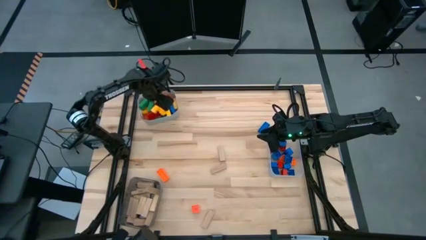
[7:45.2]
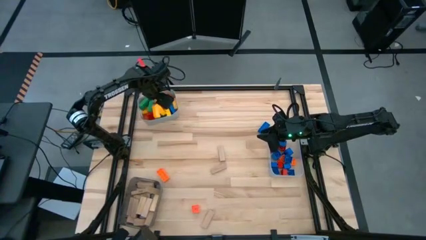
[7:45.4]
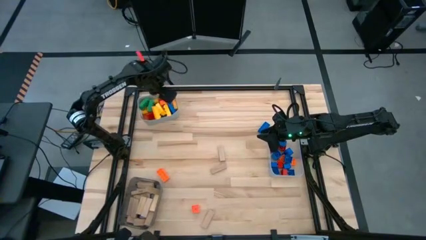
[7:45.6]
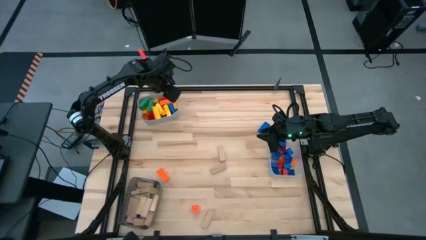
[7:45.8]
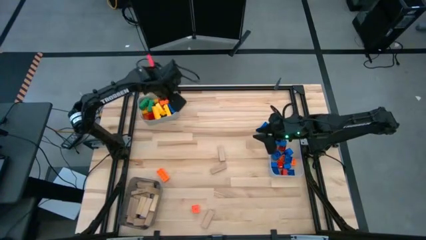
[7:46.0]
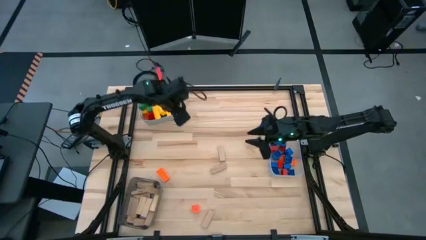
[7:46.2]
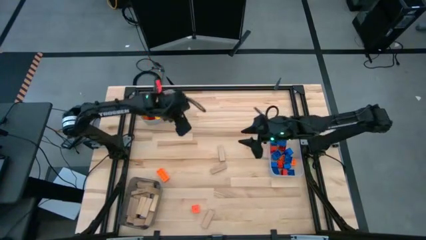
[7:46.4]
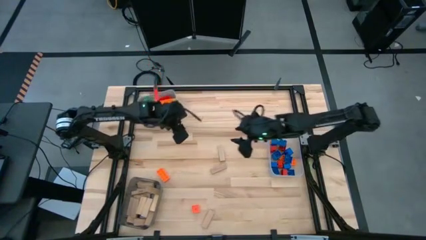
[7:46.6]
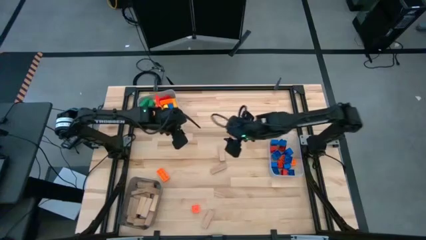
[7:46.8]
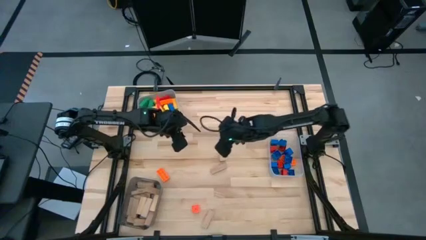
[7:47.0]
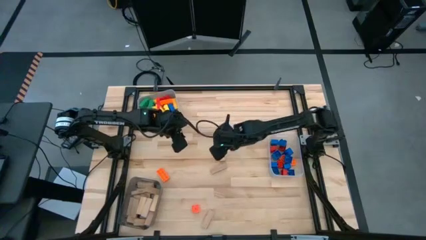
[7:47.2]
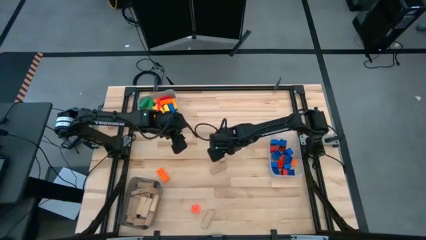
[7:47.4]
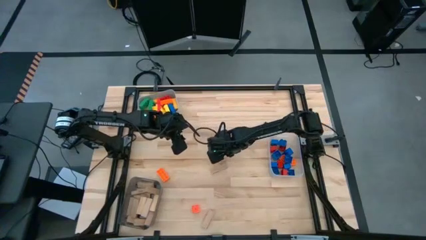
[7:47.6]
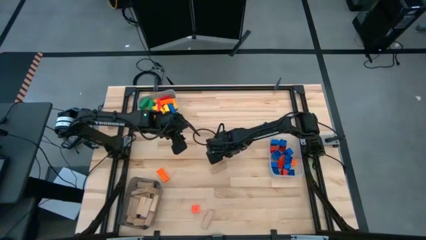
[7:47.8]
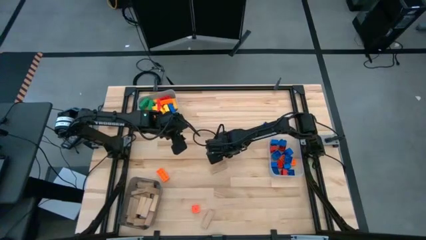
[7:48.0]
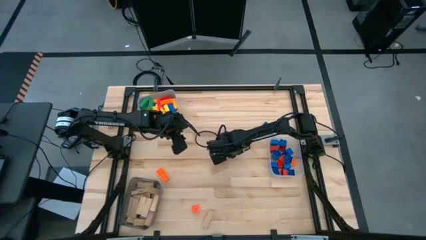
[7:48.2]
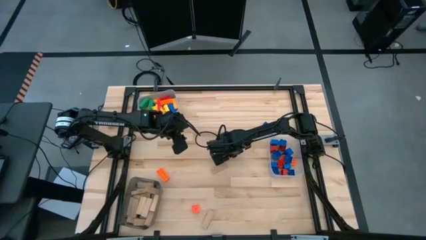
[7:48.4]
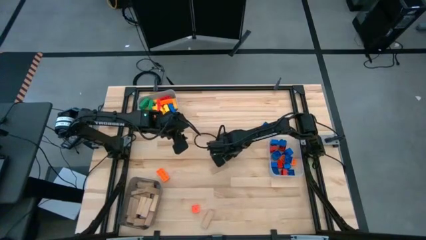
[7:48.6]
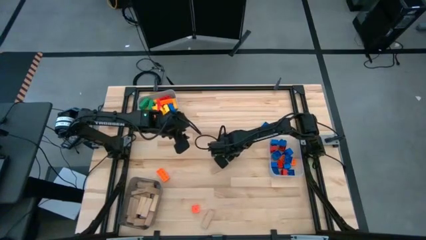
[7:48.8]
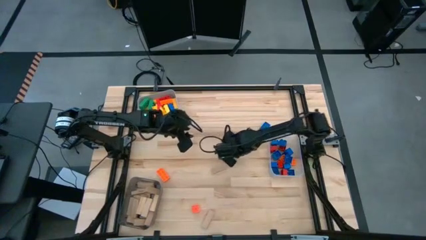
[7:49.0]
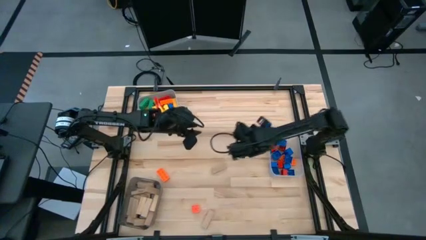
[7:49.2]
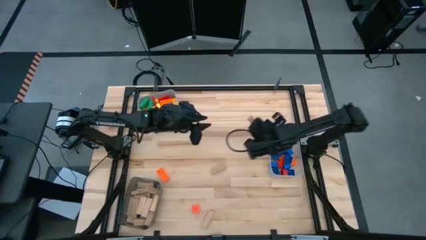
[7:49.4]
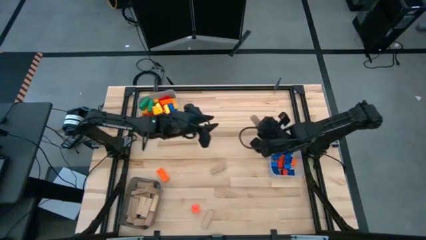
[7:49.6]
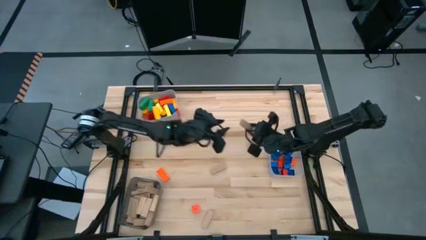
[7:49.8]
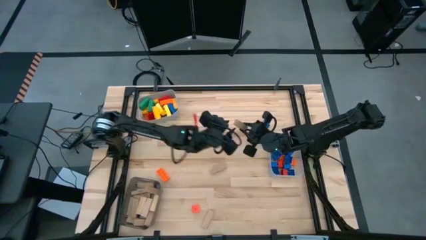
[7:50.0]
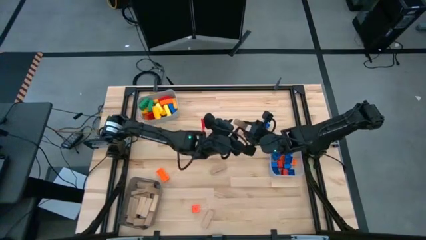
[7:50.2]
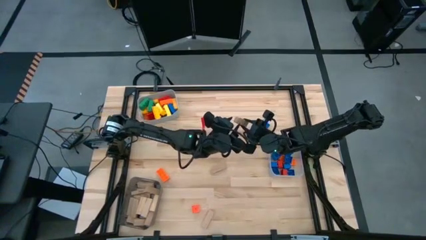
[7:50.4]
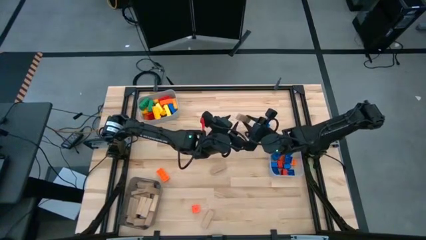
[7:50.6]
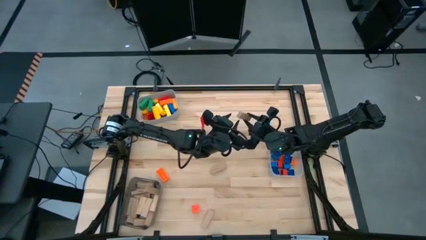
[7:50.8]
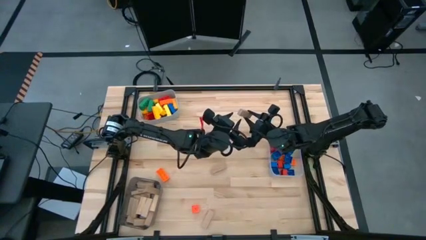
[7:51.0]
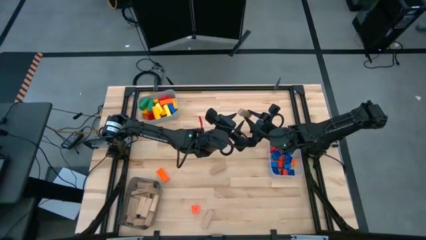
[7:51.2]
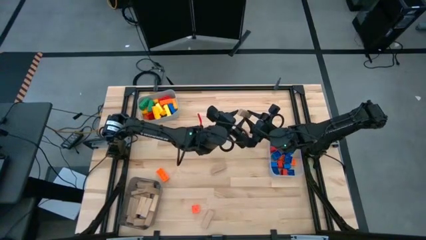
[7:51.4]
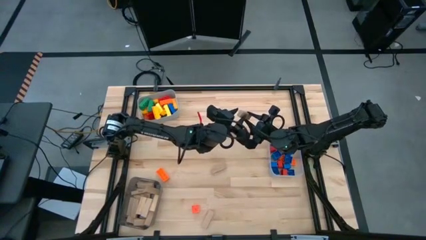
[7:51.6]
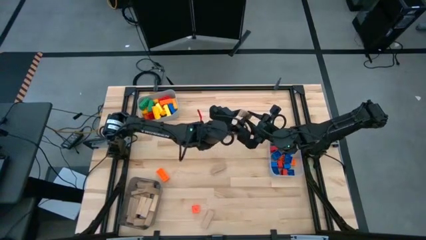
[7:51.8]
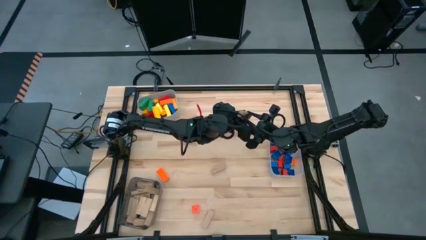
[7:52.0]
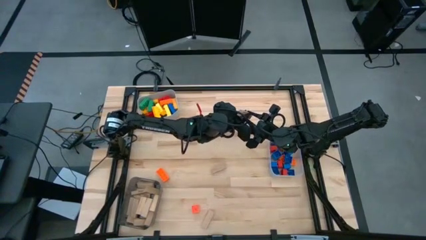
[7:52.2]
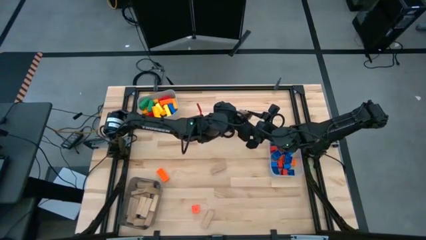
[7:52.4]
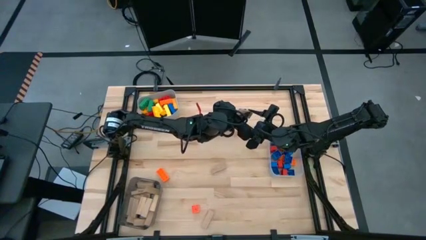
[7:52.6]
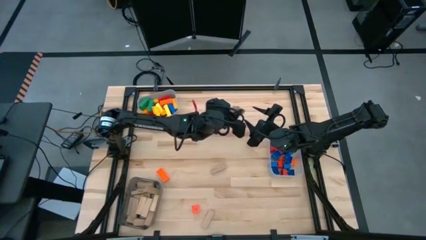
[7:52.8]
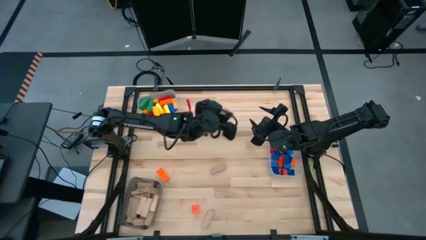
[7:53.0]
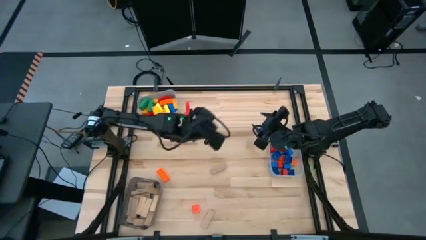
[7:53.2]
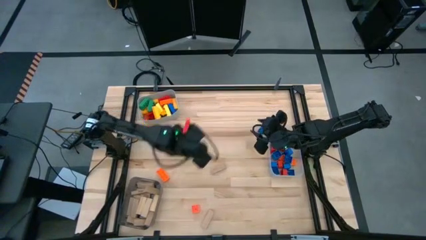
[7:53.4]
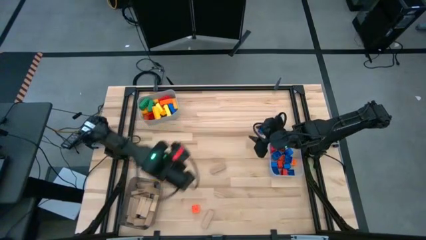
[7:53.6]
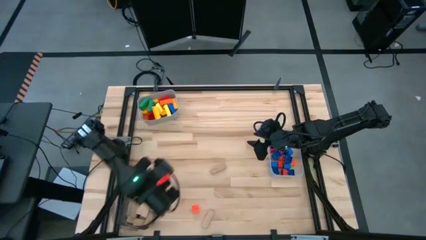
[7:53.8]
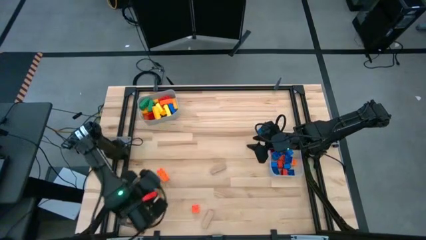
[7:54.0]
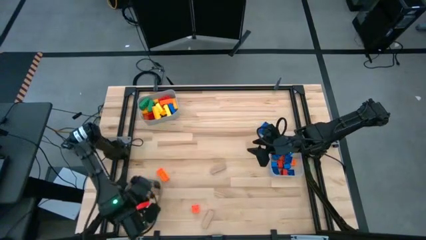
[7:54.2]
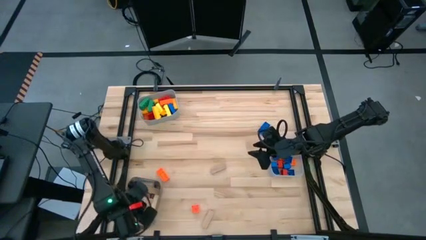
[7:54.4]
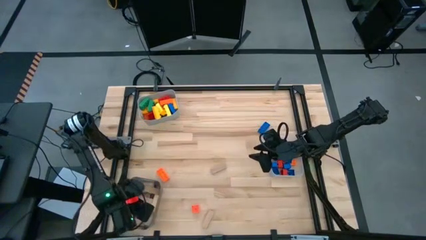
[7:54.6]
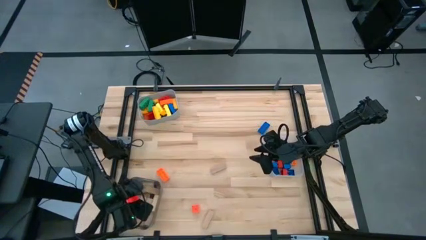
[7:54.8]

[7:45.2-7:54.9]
Task: Sort blocks by size
Put the brown block into the black bin

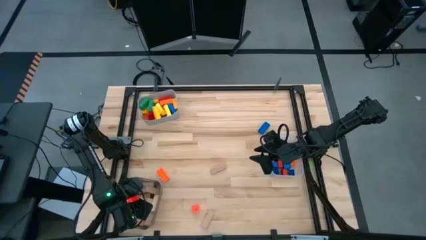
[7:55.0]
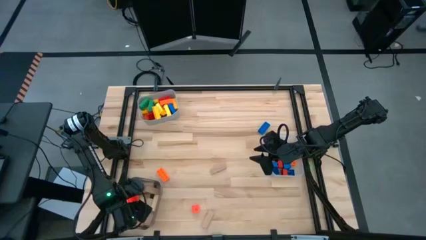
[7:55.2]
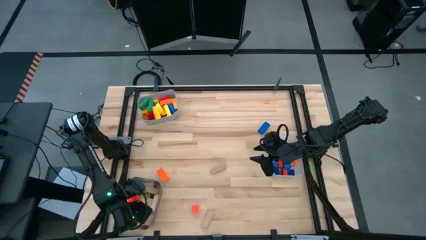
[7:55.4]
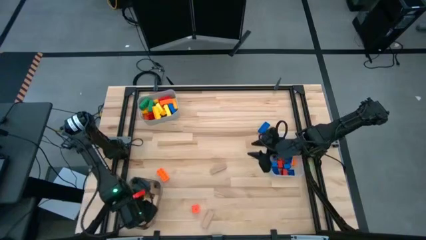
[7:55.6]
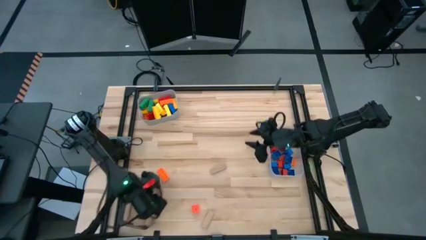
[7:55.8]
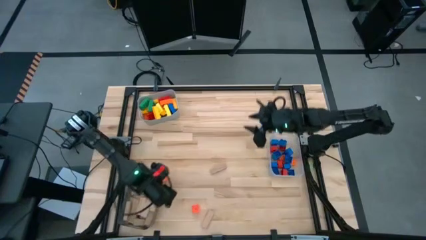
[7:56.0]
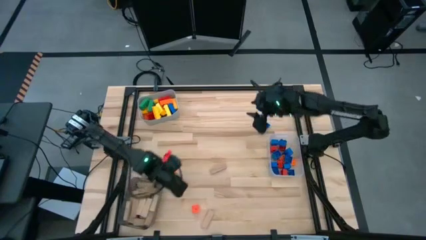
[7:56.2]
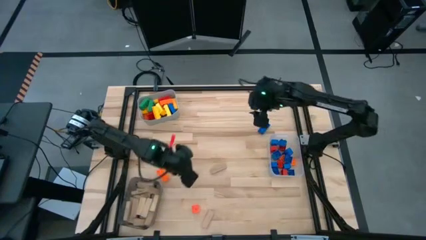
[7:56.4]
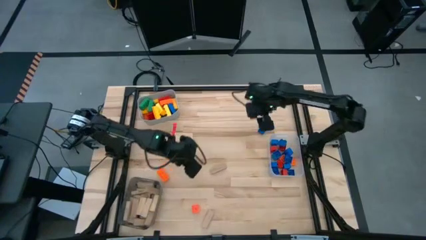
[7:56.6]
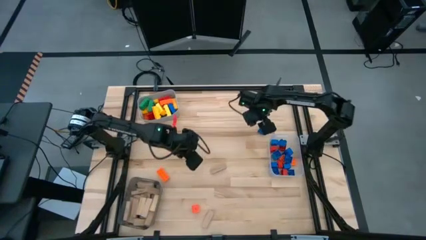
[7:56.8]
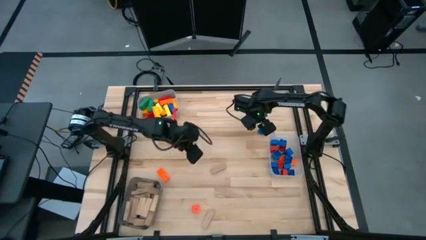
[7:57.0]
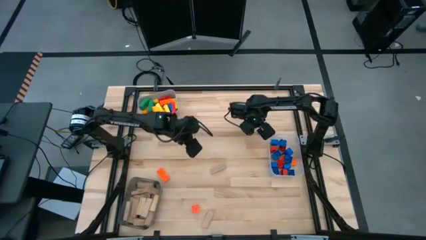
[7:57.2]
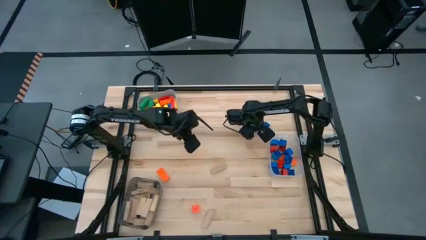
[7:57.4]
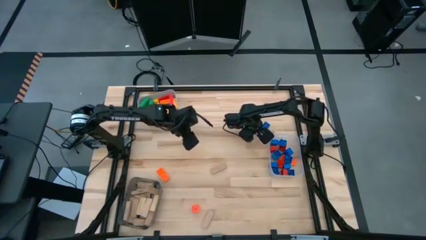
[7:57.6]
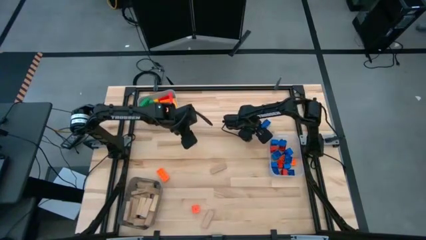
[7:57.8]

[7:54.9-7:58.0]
Put the large blue game piece into the gray bin

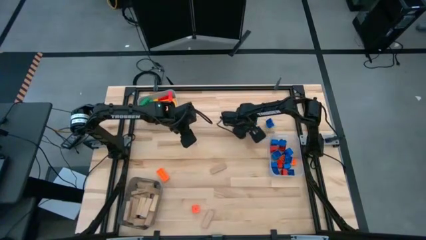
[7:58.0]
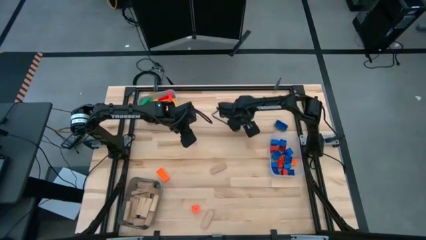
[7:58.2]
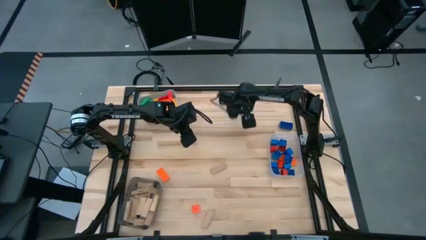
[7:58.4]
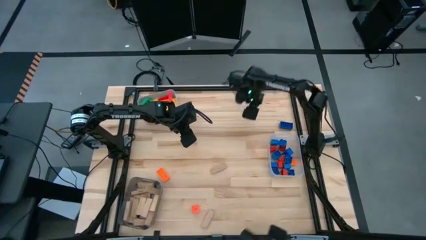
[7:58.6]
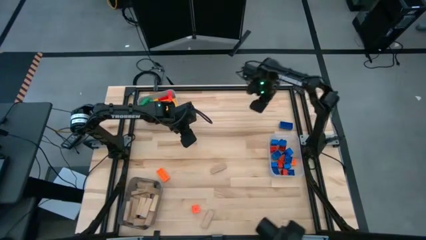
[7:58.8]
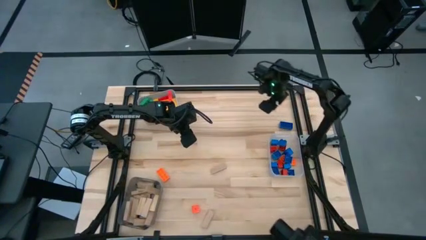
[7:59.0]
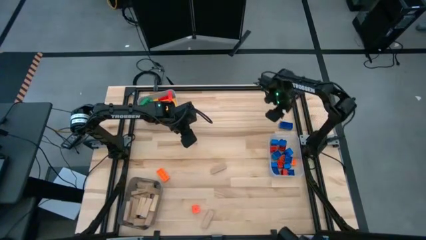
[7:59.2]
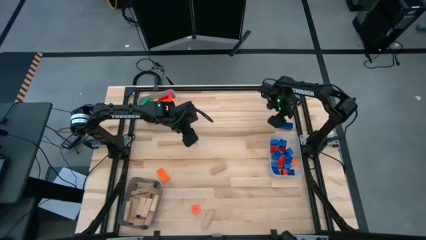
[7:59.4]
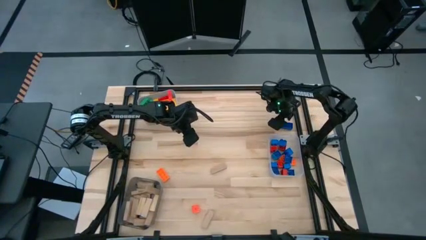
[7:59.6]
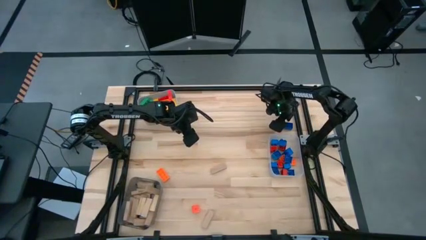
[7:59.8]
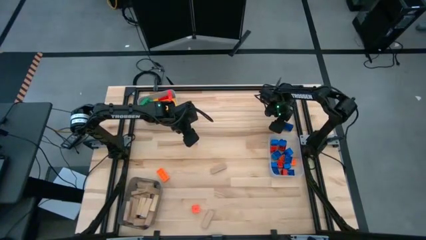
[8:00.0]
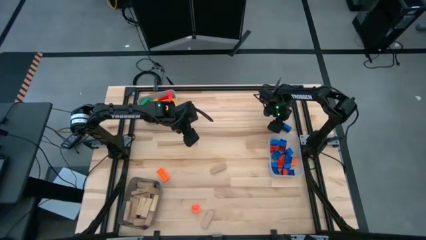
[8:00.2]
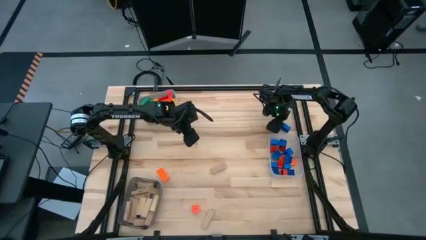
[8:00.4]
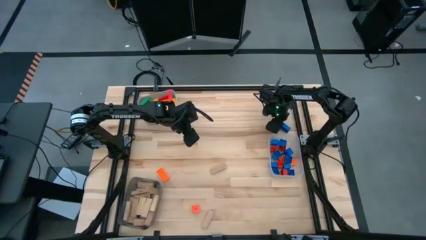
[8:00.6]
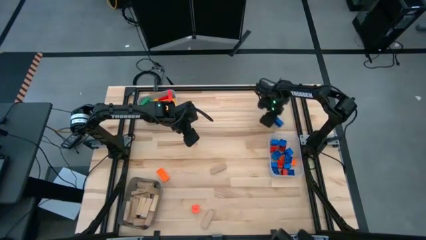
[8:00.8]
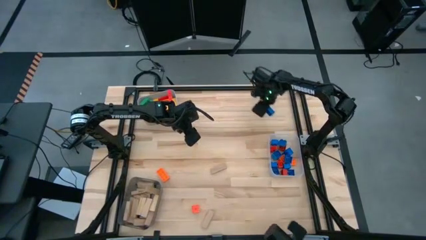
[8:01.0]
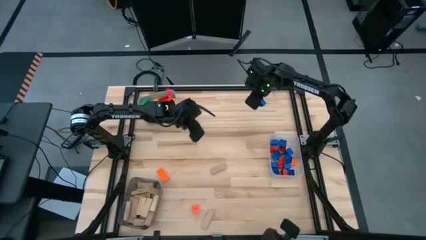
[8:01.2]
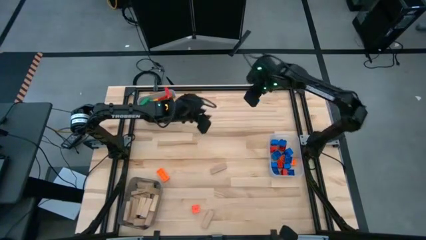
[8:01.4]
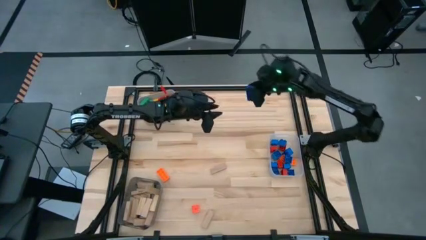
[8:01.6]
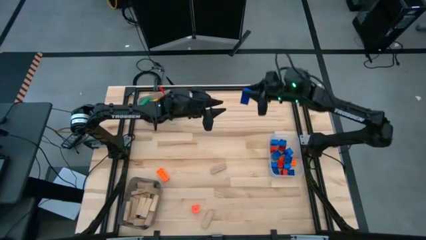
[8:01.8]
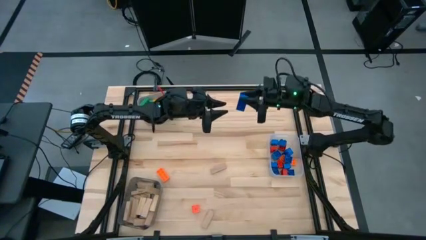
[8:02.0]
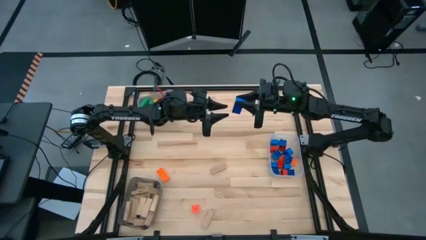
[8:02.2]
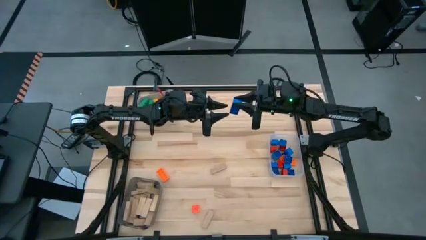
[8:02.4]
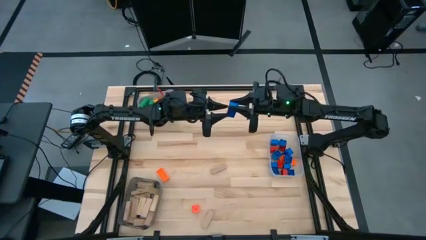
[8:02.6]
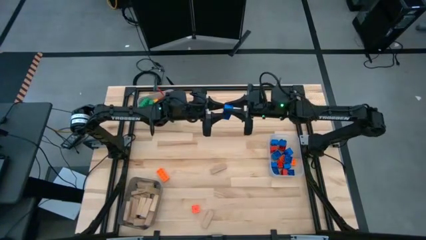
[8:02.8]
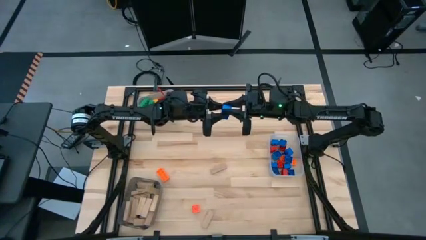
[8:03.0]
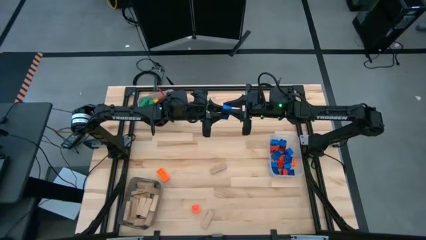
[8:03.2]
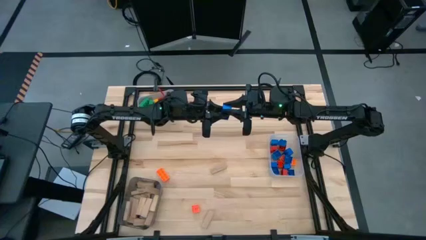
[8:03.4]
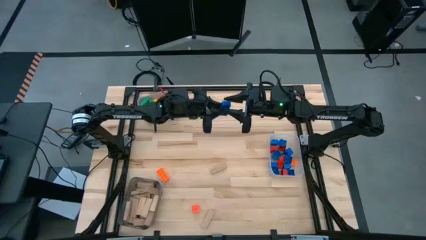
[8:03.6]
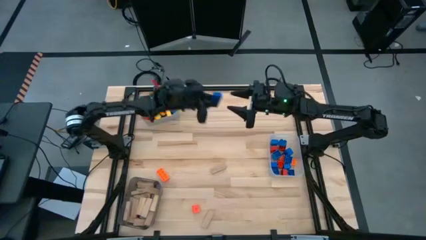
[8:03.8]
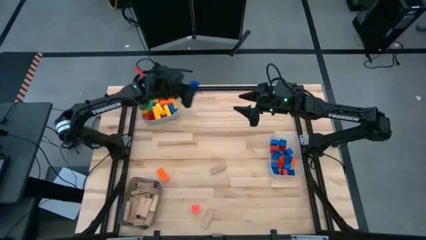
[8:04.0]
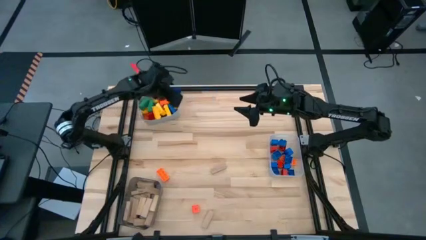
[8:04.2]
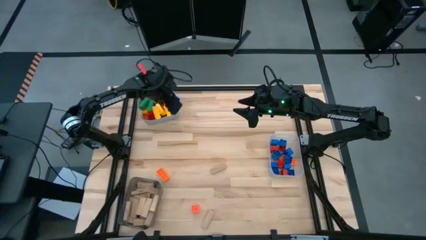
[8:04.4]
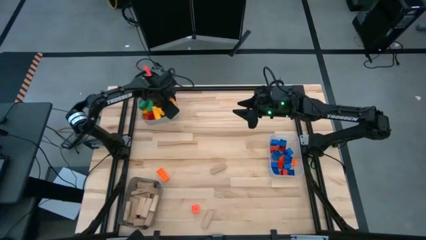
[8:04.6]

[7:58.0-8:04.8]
Put the large blue game piece into the gray bin
